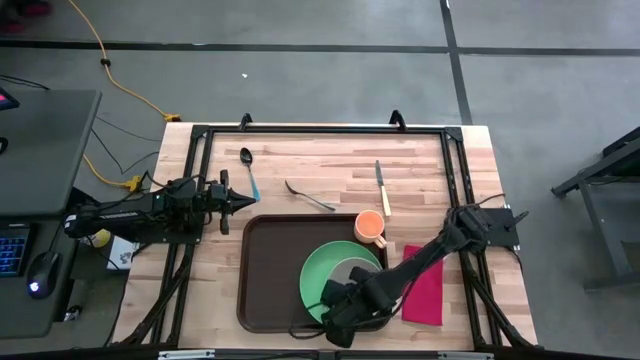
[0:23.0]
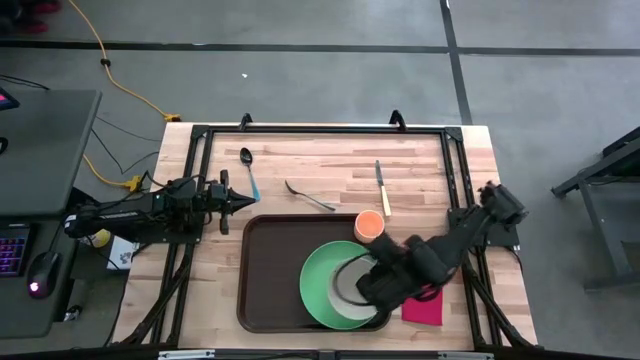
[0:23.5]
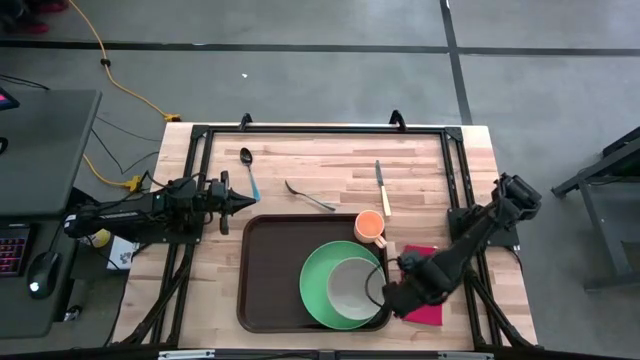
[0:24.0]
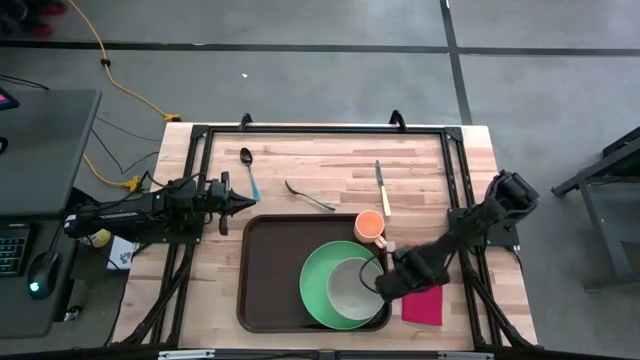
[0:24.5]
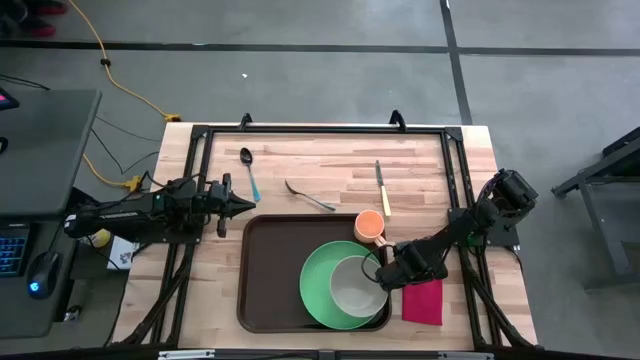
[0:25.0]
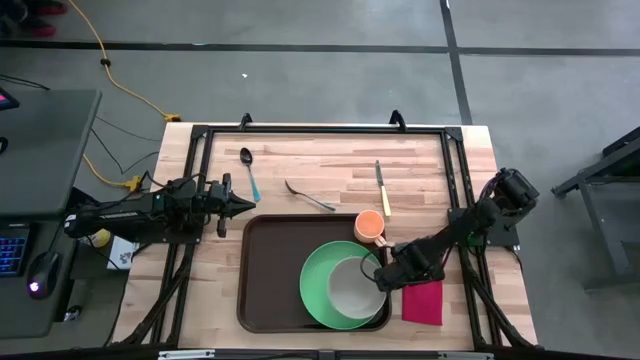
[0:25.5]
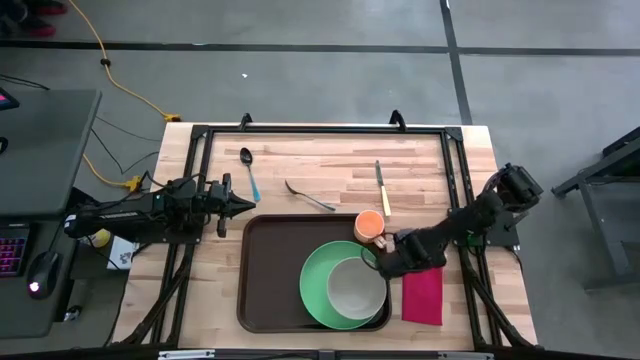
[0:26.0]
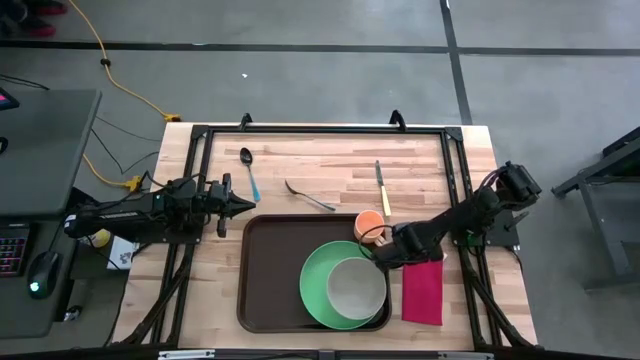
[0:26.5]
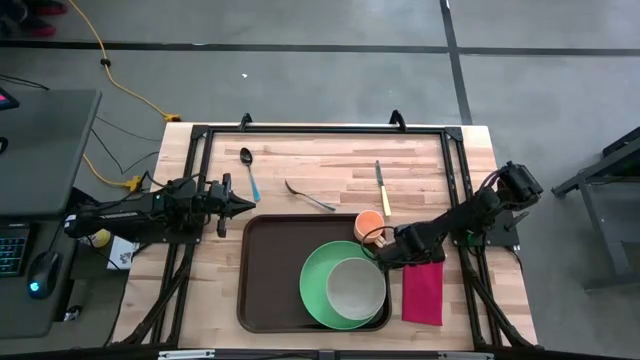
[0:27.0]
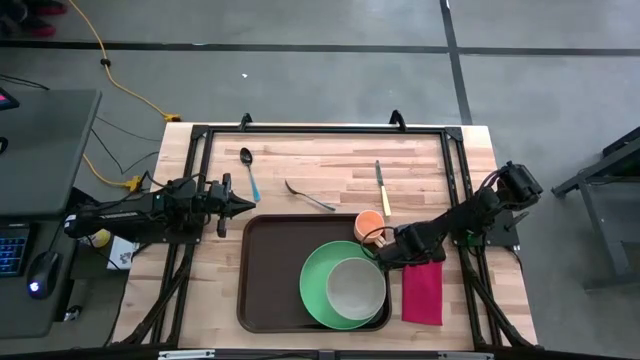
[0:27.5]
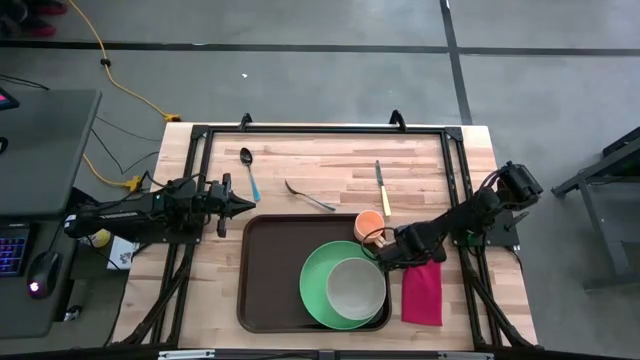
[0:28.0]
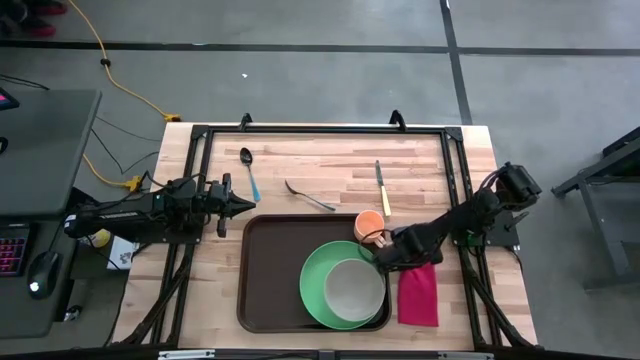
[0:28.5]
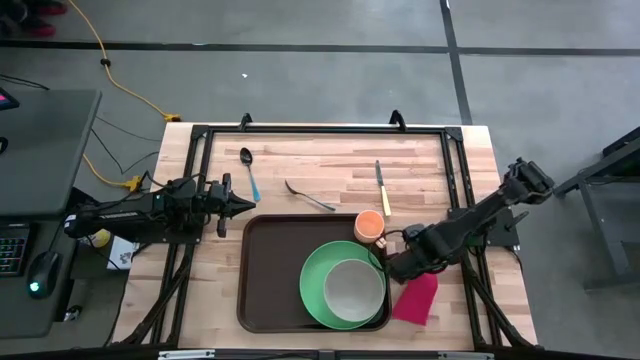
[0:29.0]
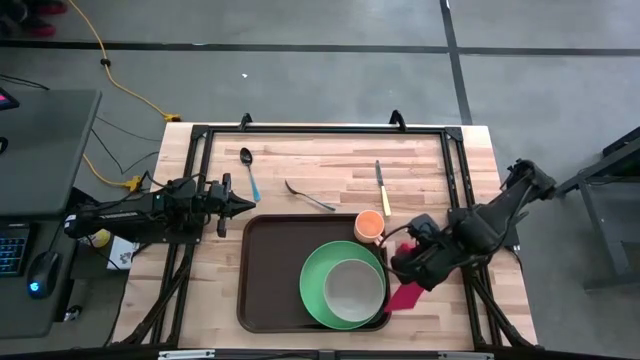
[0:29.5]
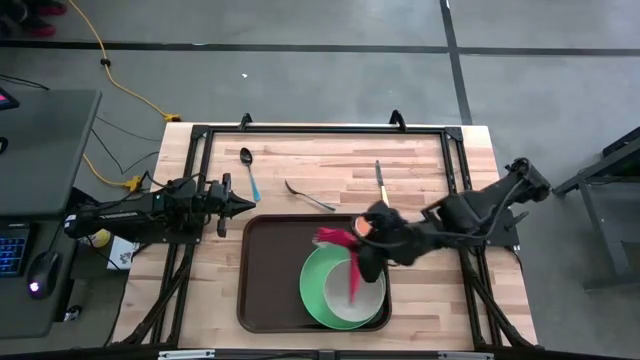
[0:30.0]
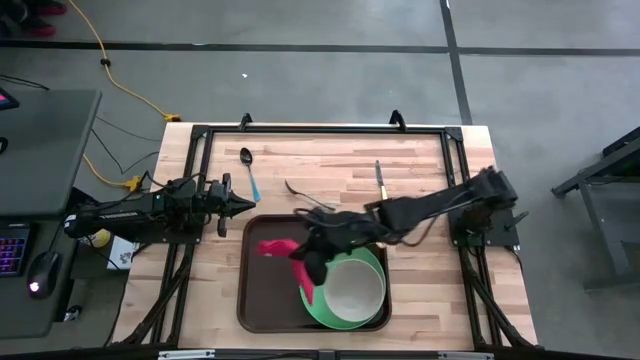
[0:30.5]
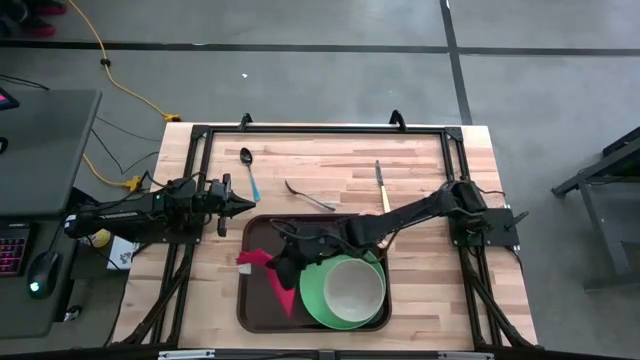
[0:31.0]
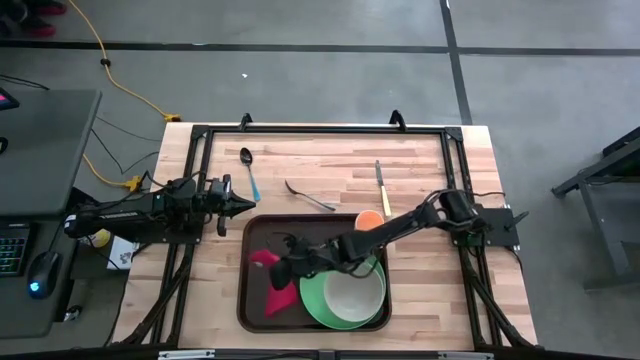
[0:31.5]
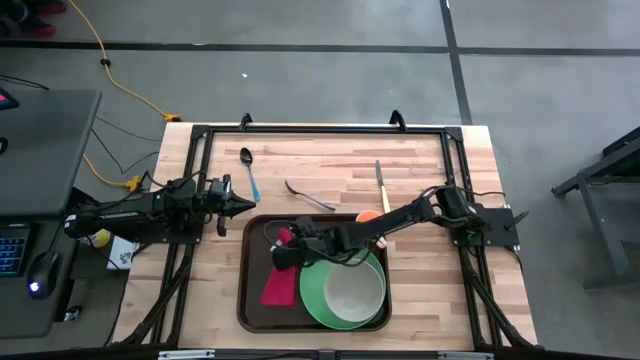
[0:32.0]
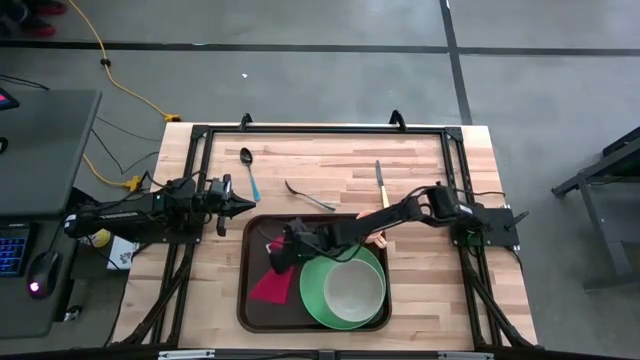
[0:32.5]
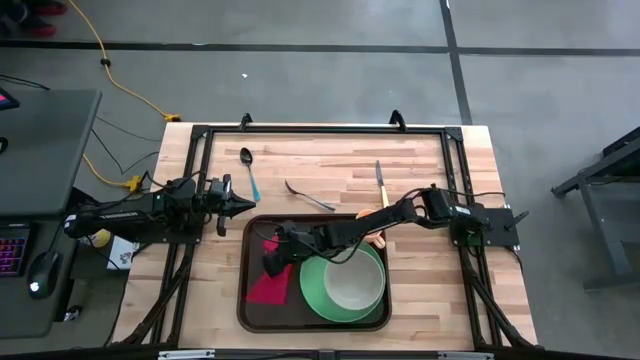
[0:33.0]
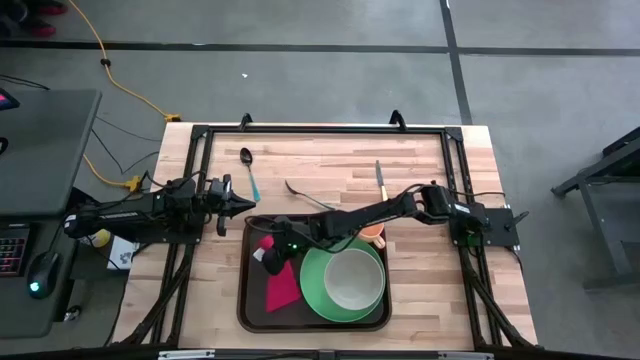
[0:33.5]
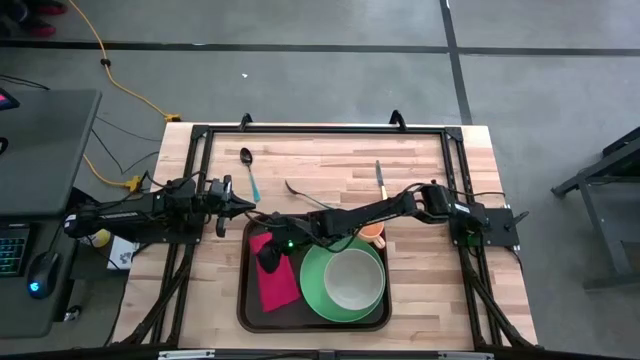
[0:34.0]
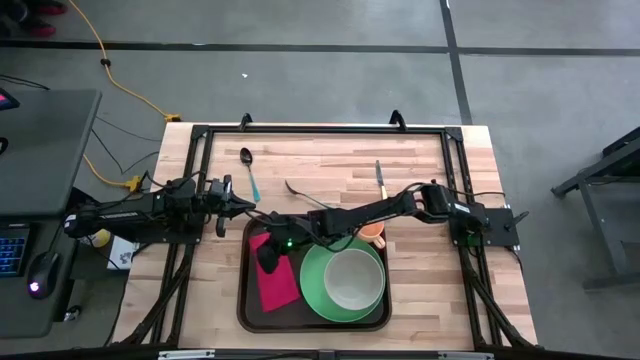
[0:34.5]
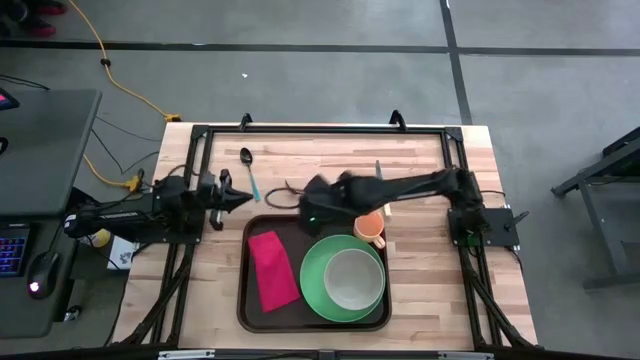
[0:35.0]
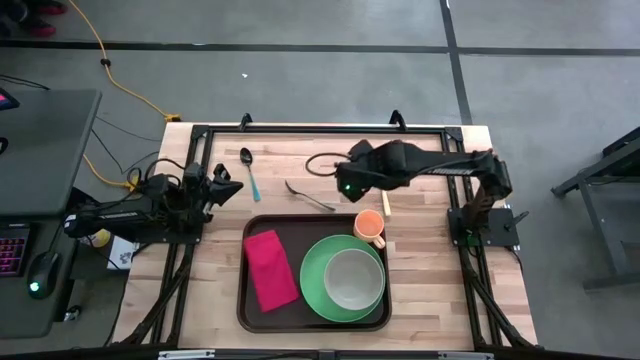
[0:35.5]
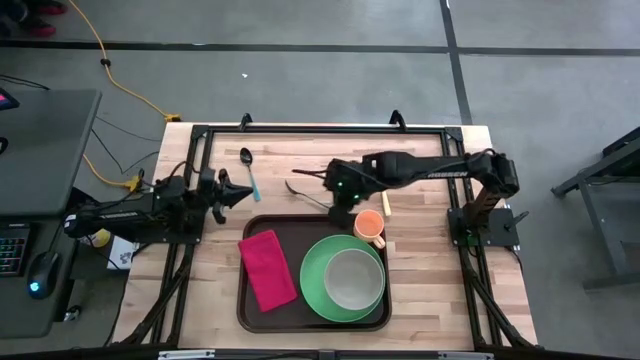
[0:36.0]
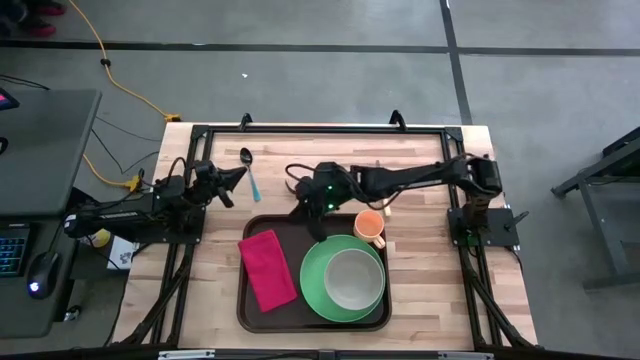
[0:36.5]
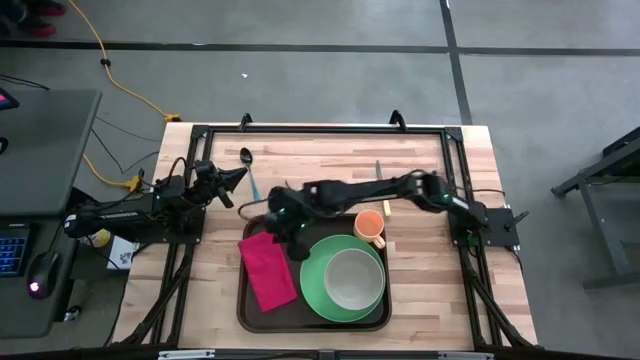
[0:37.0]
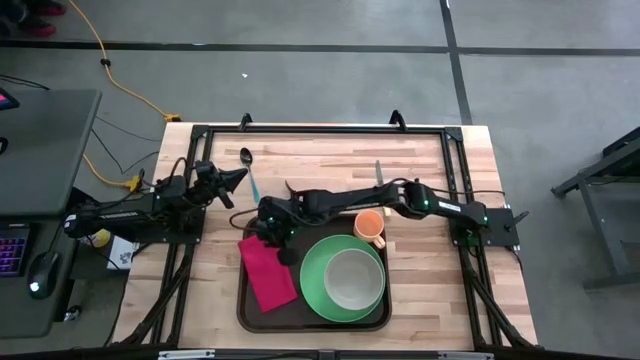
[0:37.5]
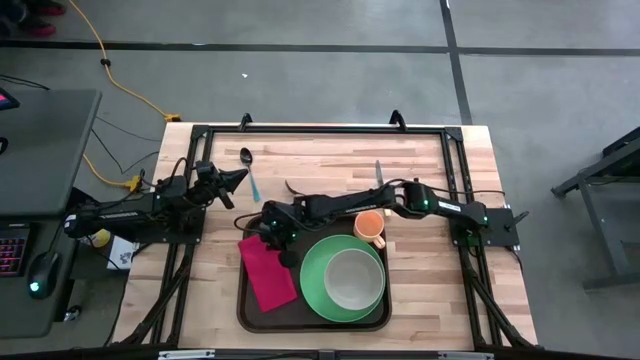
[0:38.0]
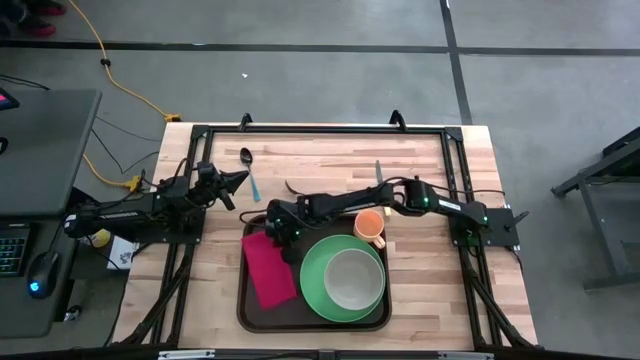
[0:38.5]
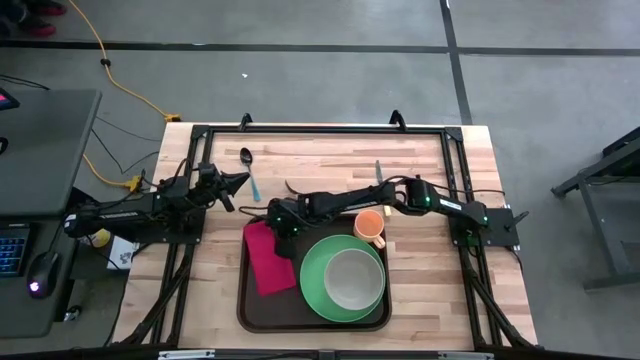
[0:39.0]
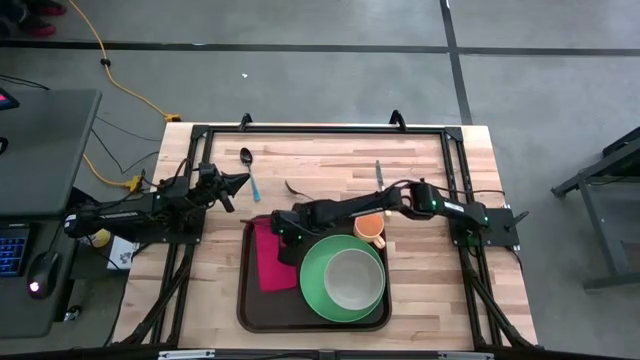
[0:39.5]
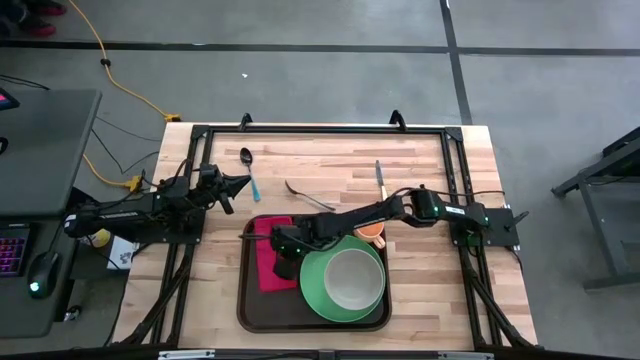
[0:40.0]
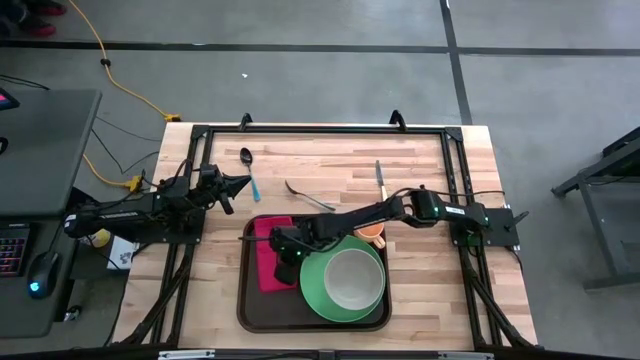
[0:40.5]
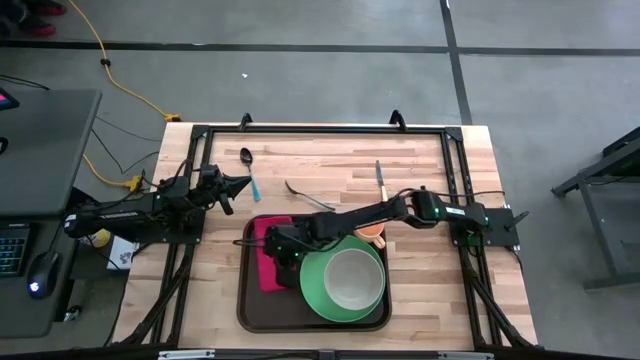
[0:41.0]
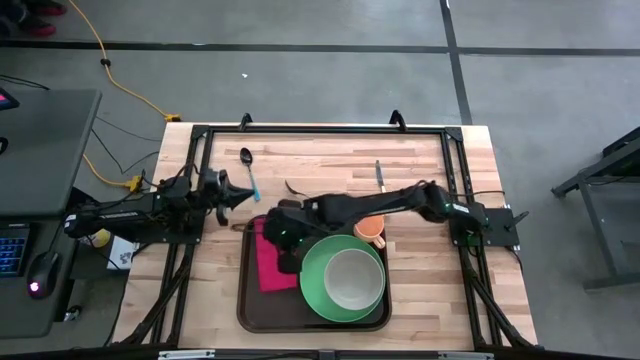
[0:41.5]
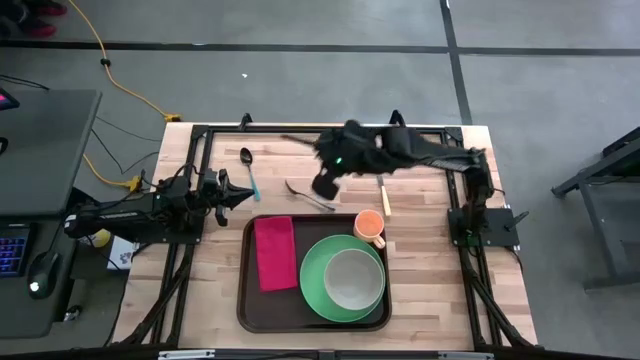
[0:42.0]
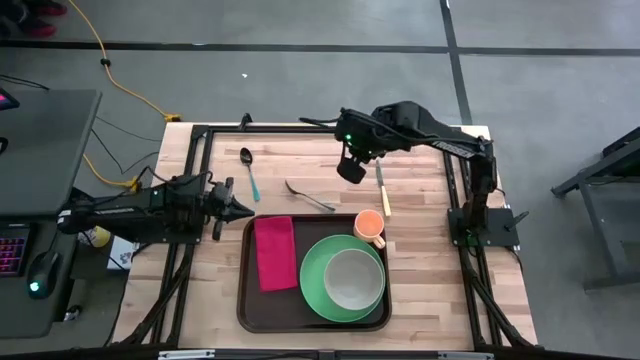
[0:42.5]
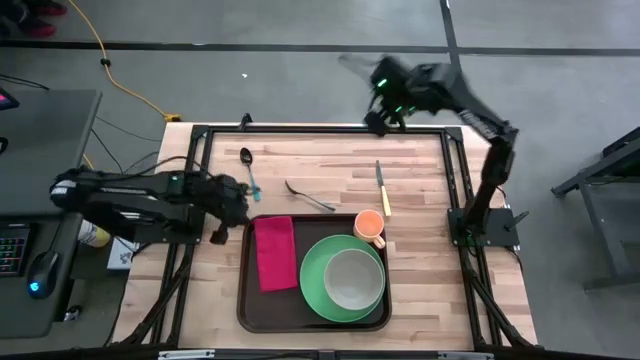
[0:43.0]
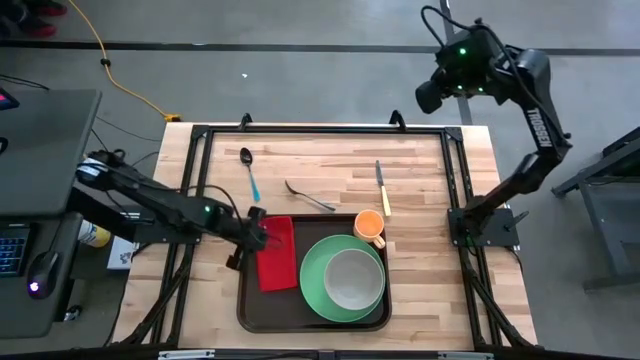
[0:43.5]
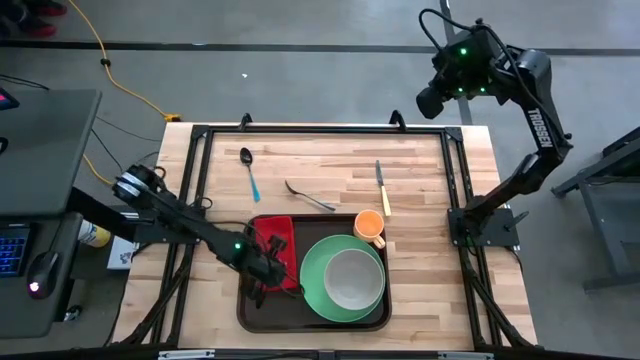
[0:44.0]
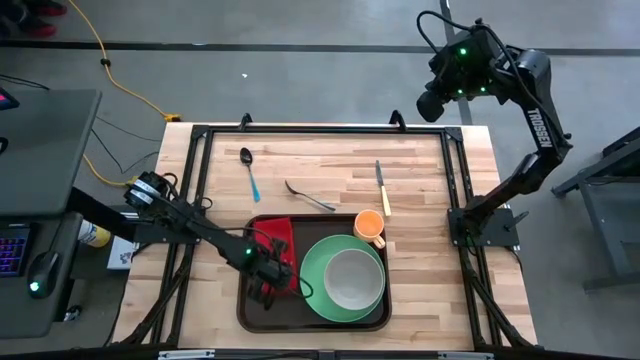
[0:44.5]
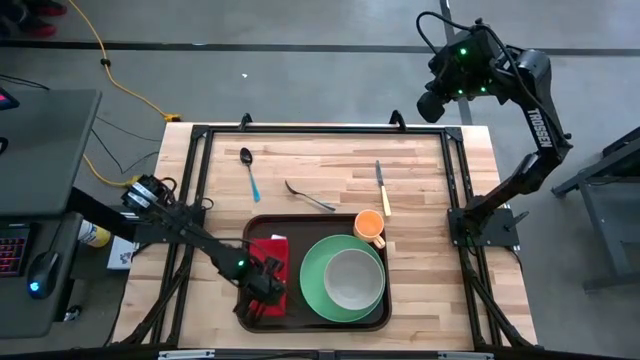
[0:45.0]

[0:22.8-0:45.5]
Task: Set up tray
Put the red napkin on the black serving tray
